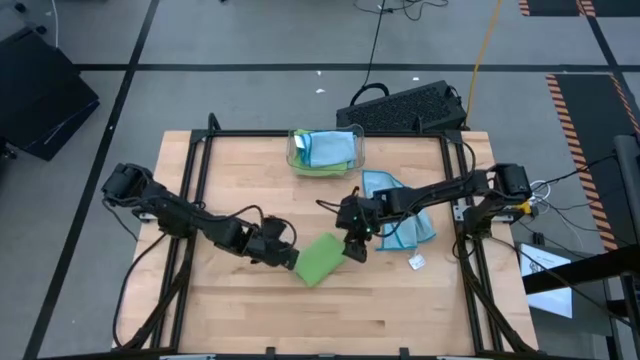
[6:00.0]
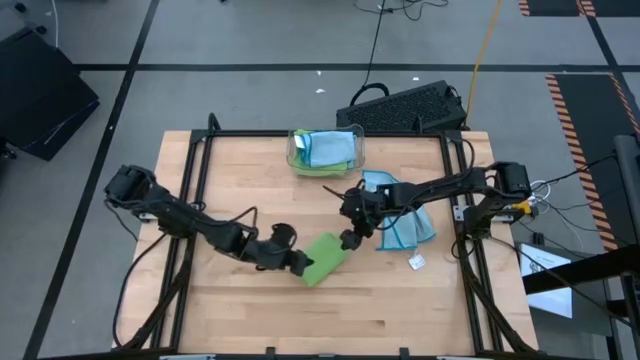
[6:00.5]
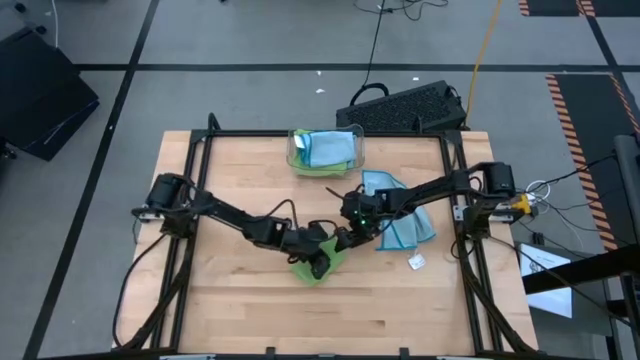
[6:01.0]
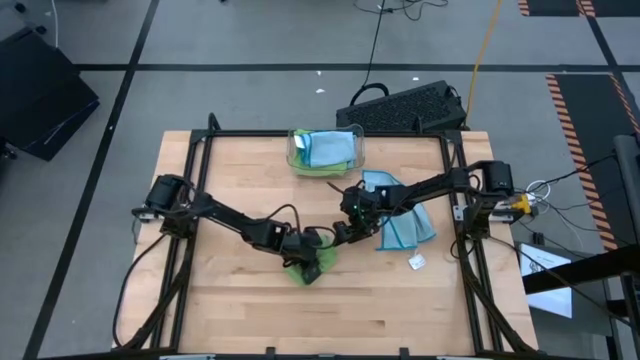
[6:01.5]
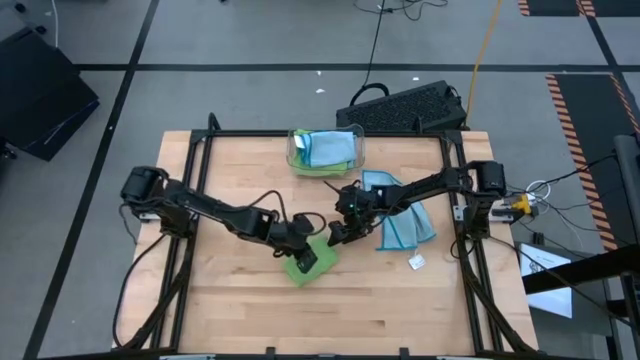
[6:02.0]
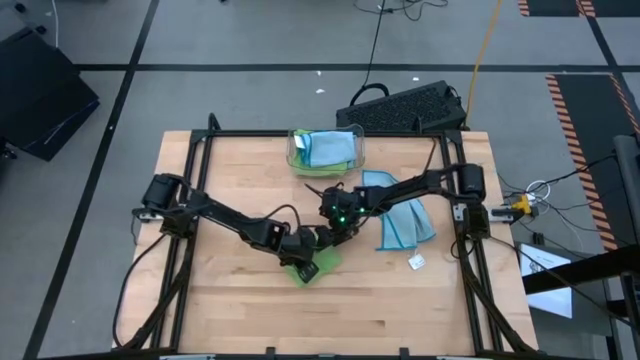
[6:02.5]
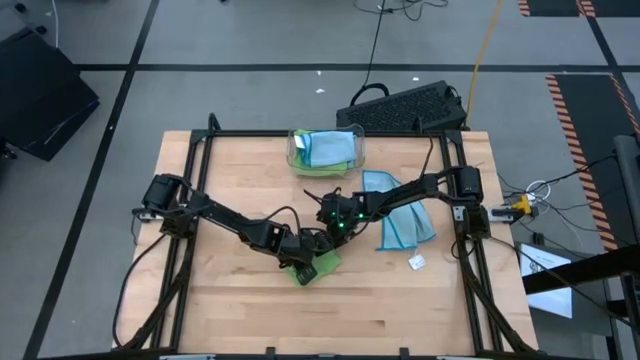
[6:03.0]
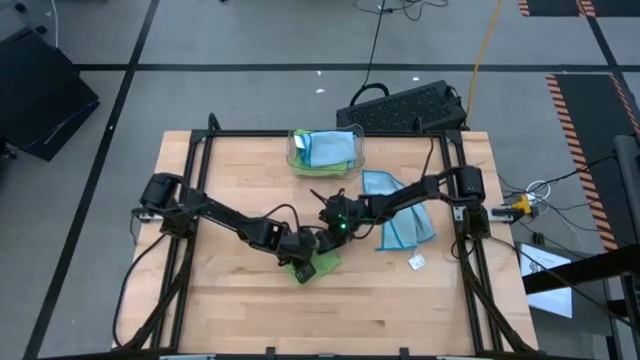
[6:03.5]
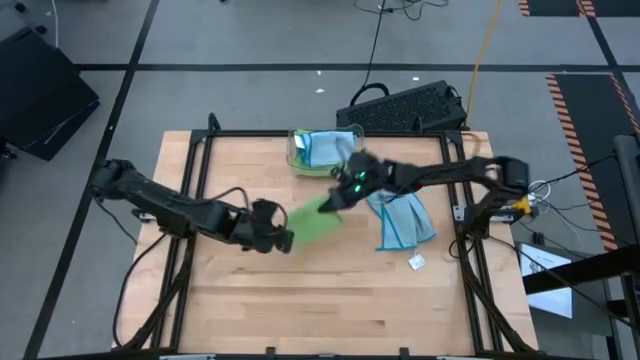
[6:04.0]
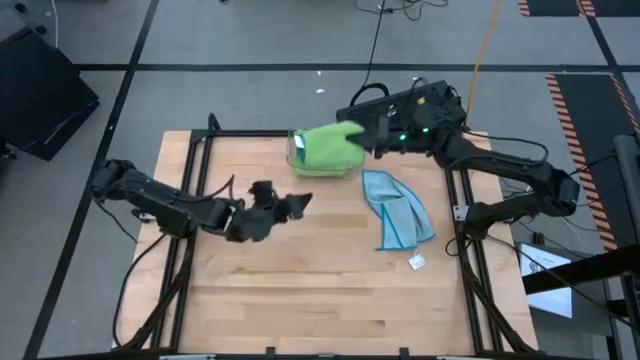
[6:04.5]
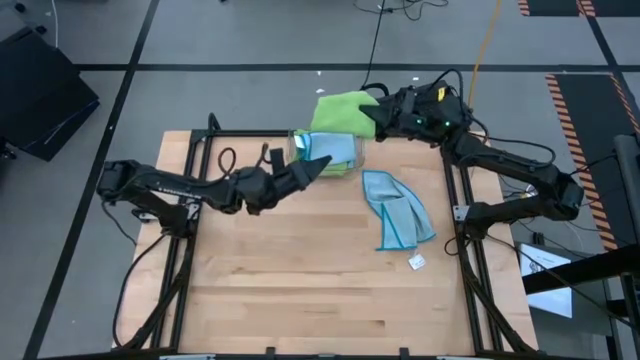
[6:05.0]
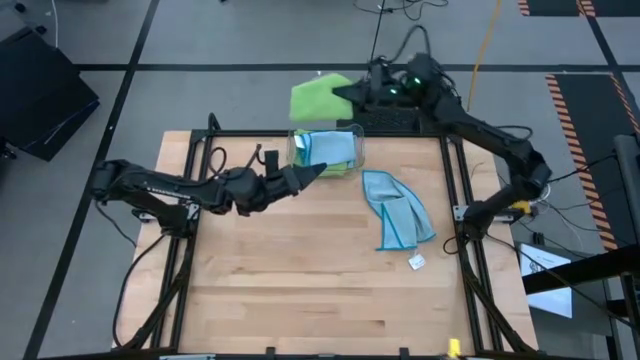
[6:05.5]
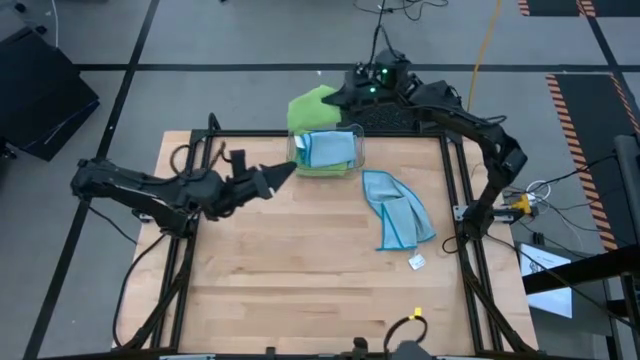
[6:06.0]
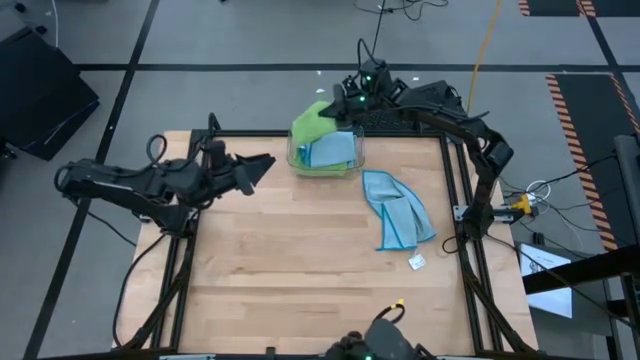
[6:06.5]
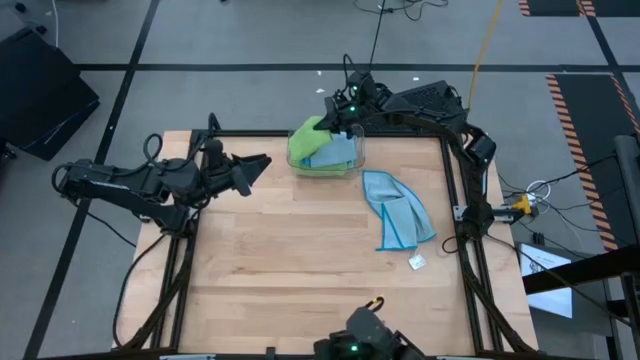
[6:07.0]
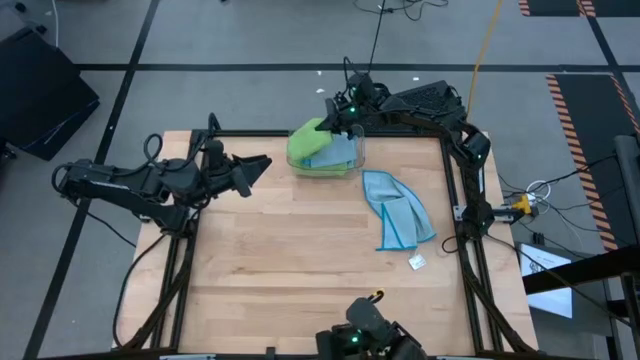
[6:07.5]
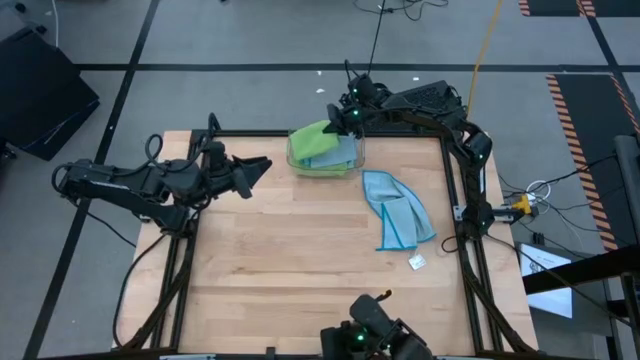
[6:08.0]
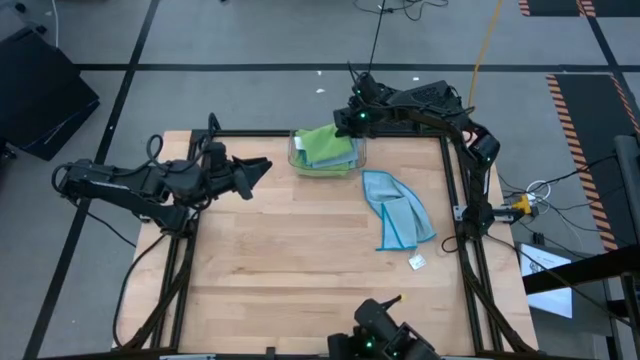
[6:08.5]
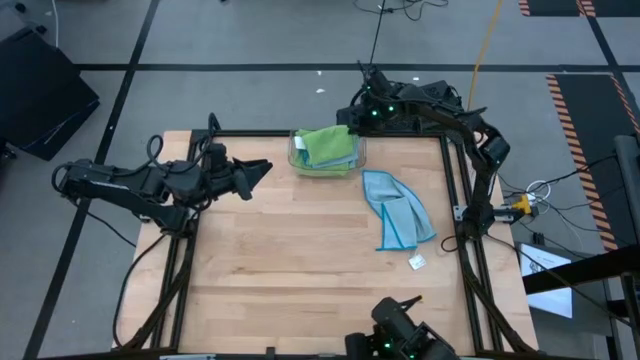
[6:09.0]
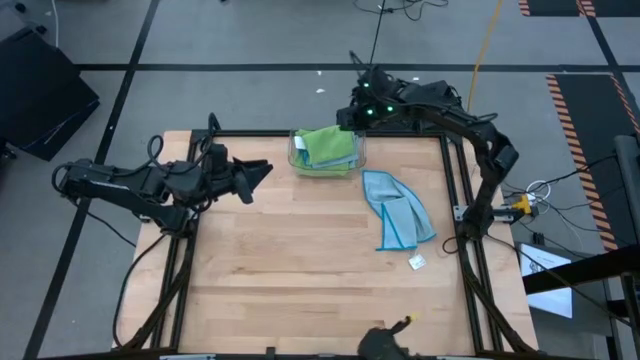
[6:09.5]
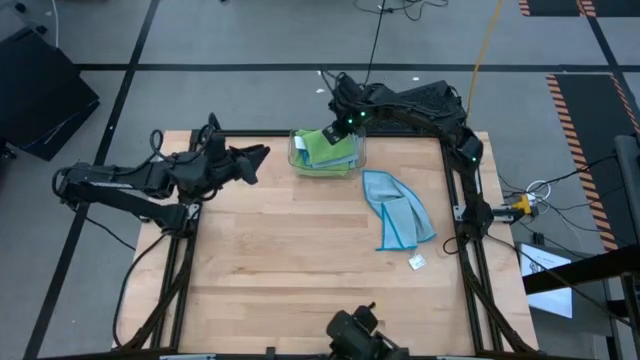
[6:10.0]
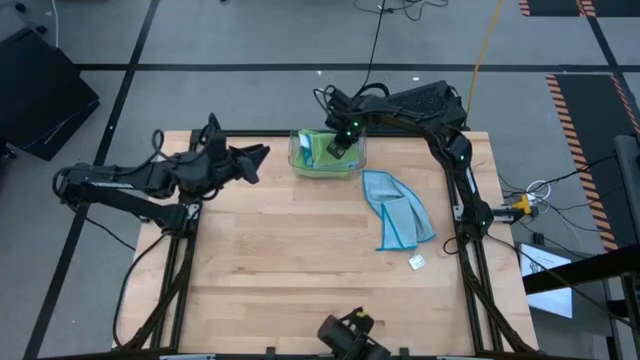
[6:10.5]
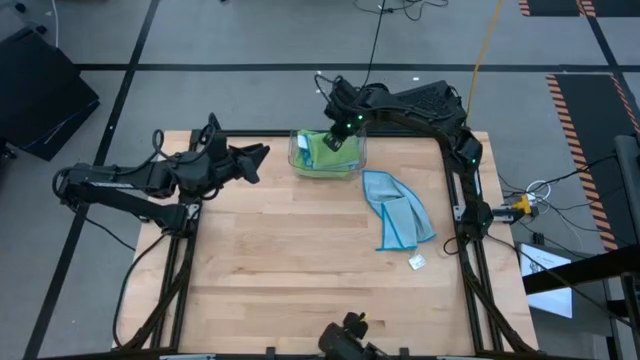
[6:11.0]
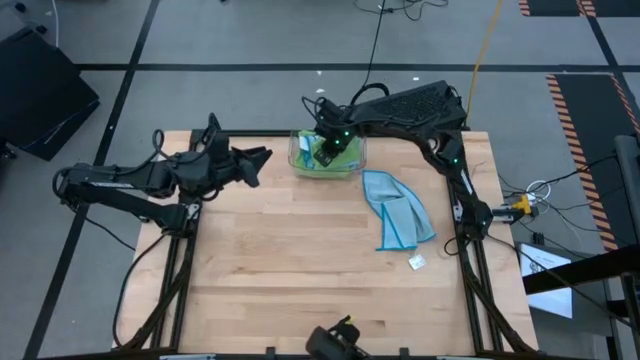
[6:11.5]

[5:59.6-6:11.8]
Task: Fold microfiber towels
Put the folded green microfiber cloth into the transparent bin

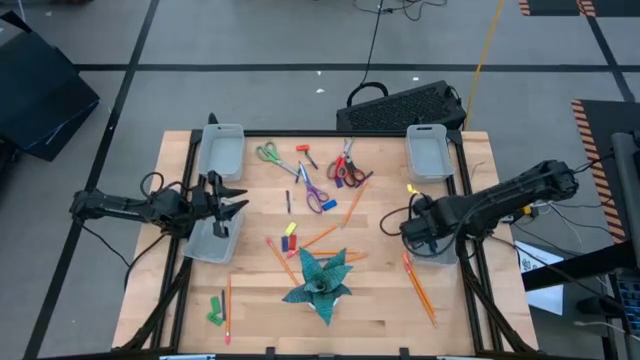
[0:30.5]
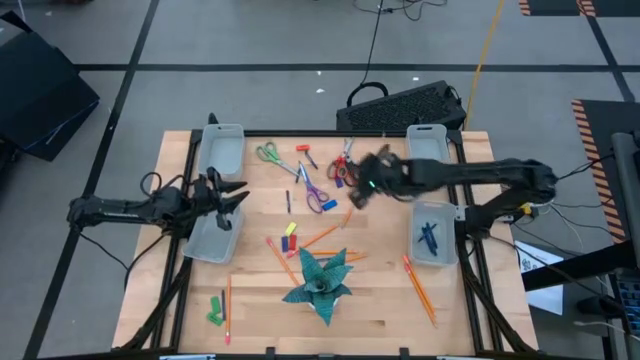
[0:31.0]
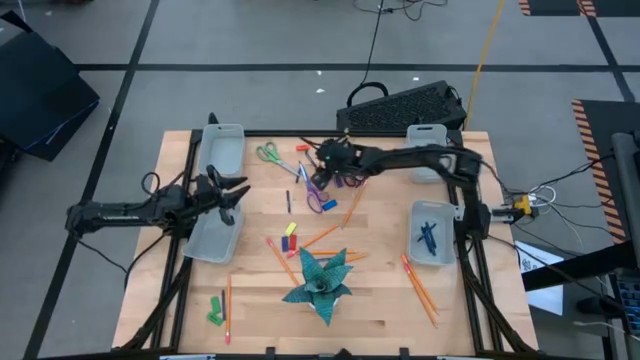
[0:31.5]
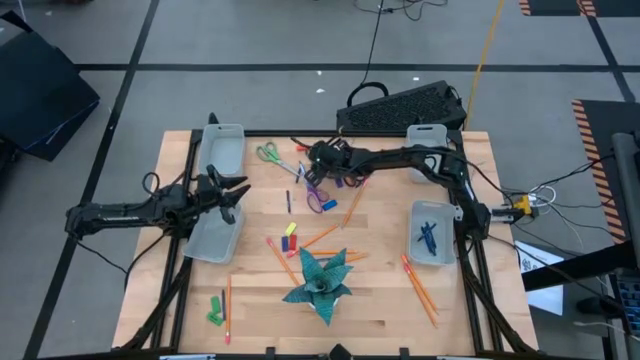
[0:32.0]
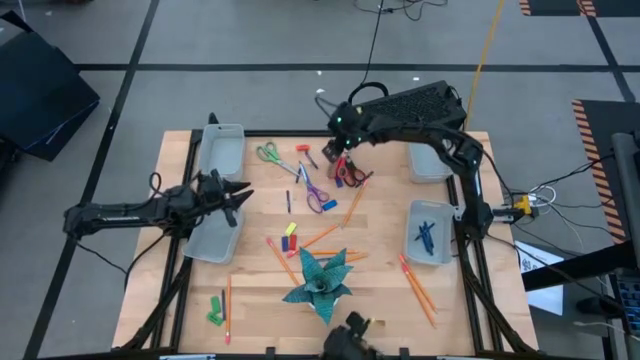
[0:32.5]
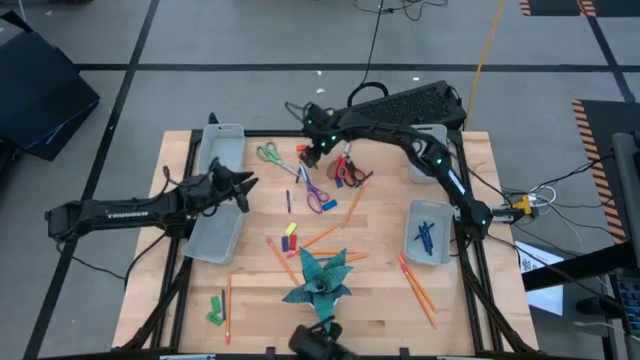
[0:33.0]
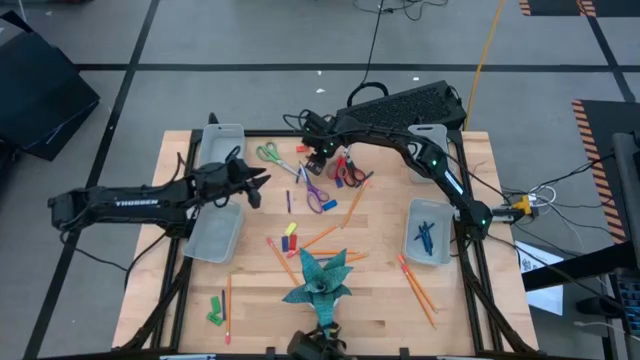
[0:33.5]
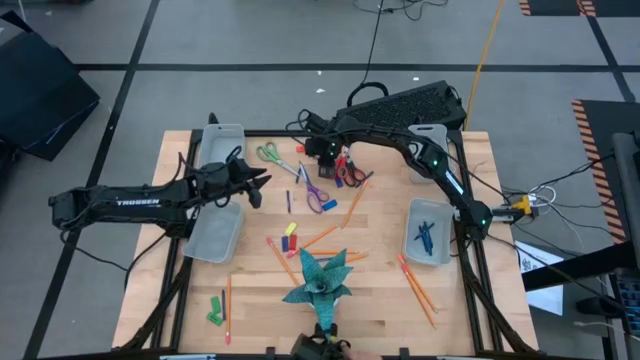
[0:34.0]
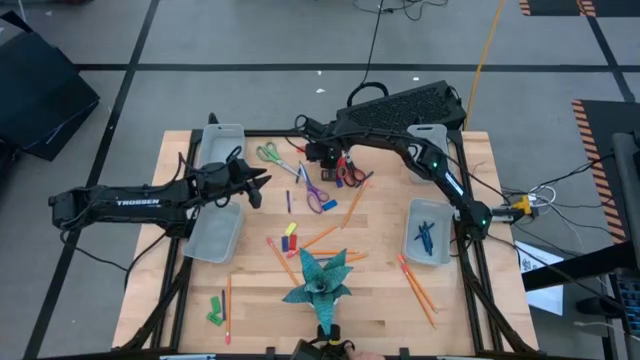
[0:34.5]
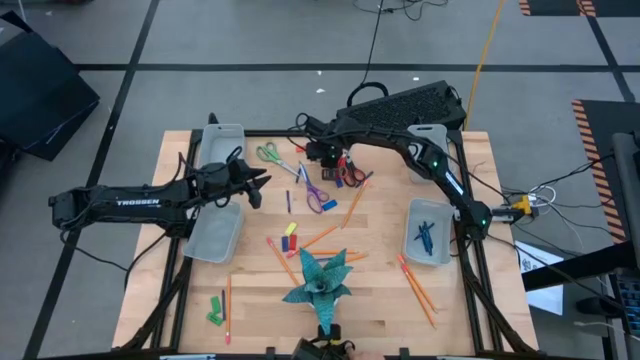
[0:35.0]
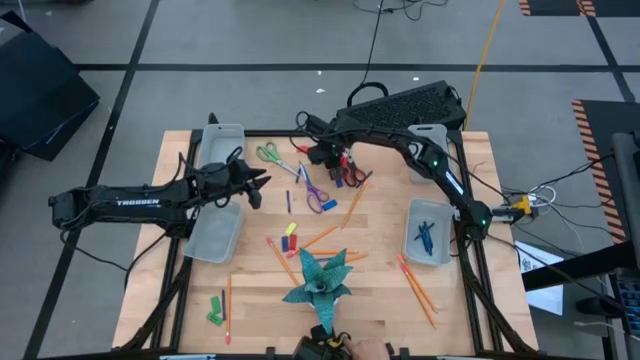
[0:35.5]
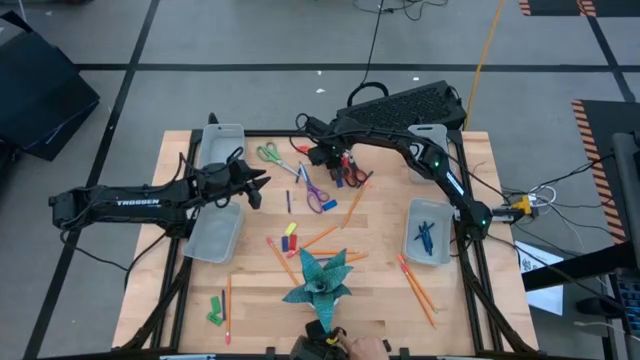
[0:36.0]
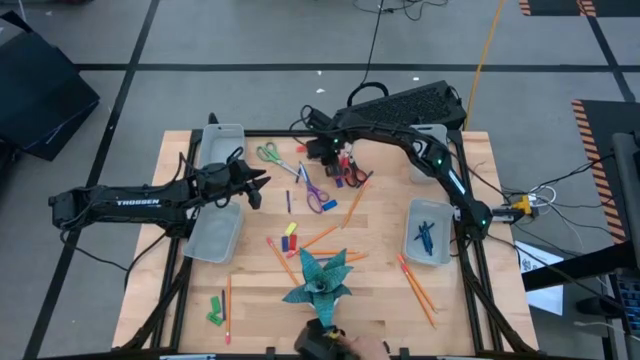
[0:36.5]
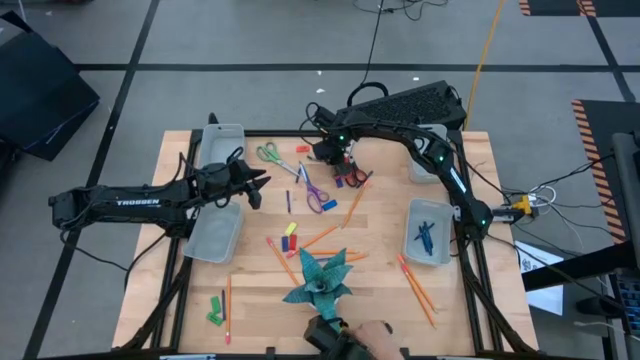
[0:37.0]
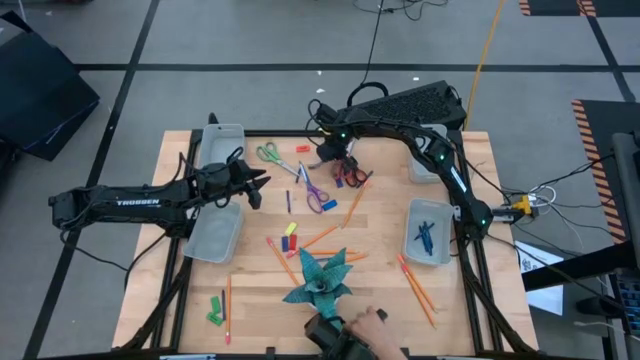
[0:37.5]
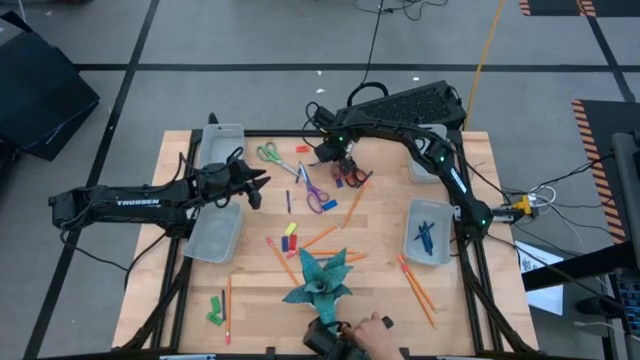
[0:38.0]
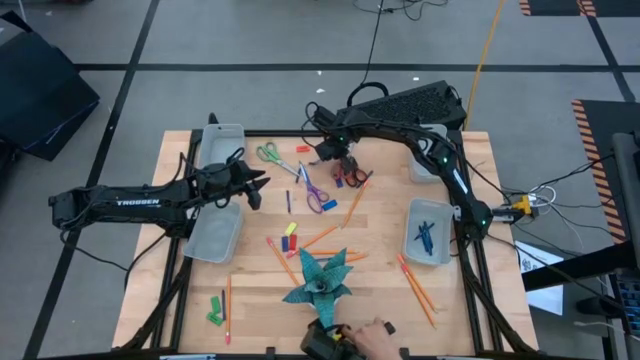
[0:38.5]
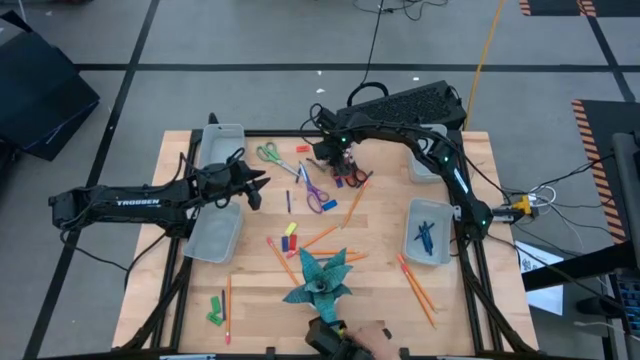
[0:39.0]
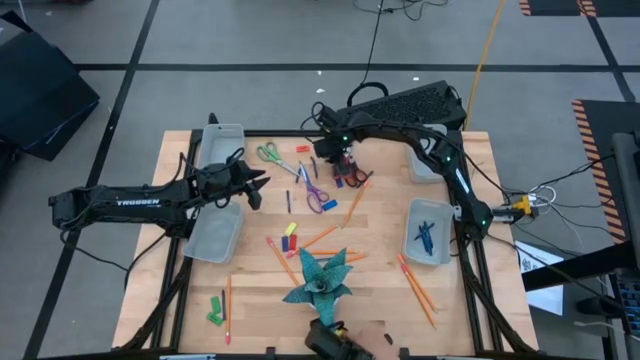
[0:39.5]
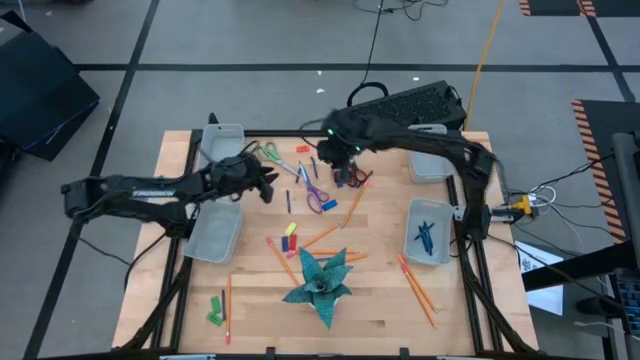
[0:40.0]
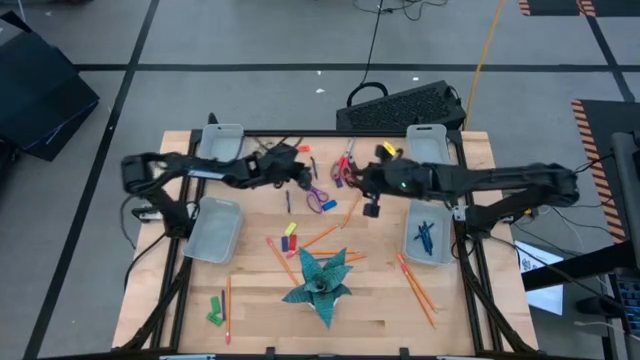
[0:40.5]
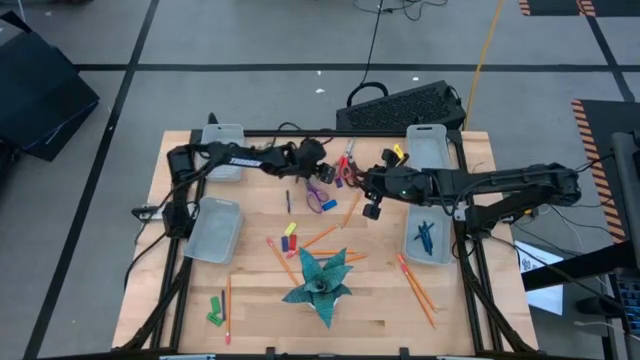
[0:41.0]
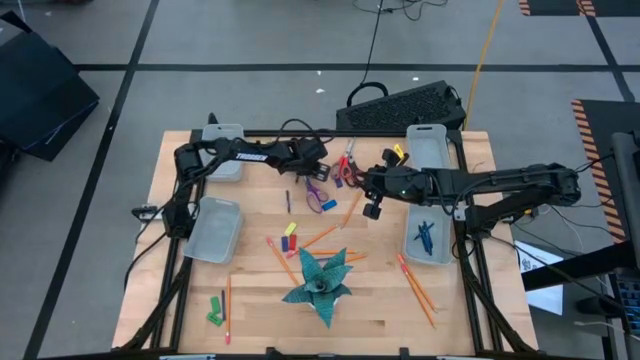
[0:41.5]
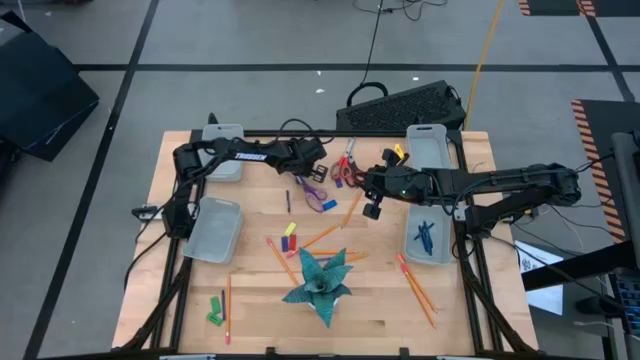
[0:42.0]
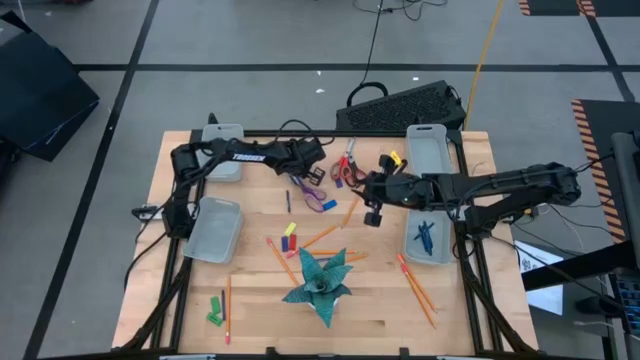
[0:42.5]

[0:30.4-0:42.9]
Task: Sort crayons/erasers/pens/pencils in bins
Put the blue crayon into the bottom right gray bin
